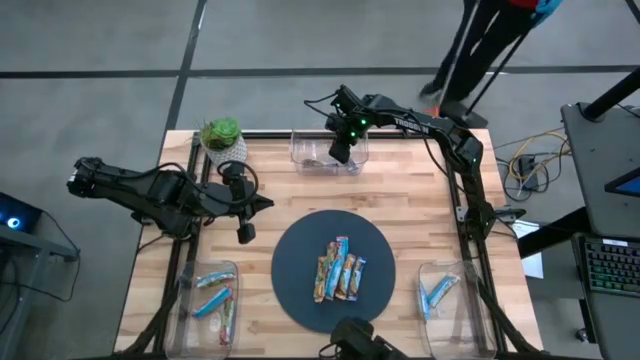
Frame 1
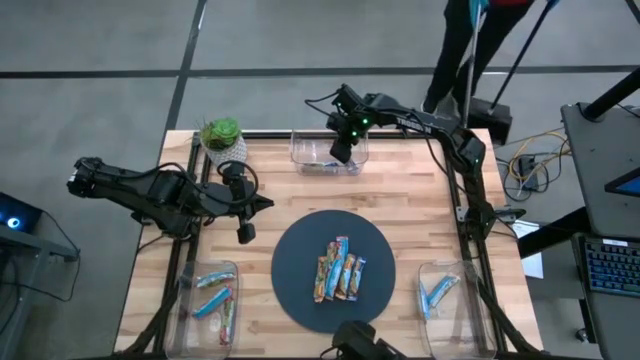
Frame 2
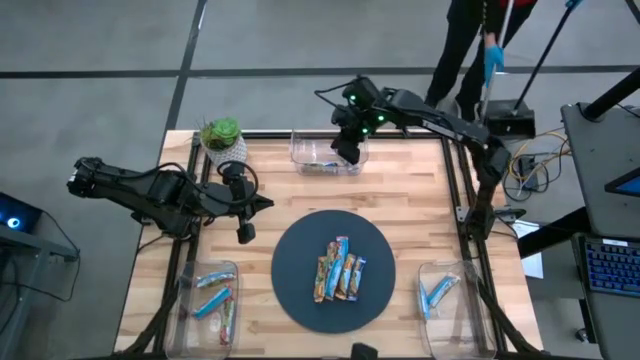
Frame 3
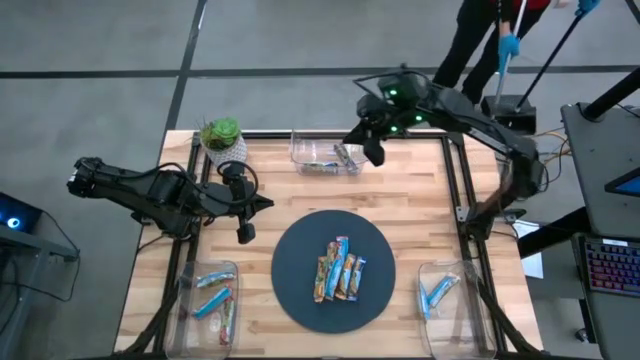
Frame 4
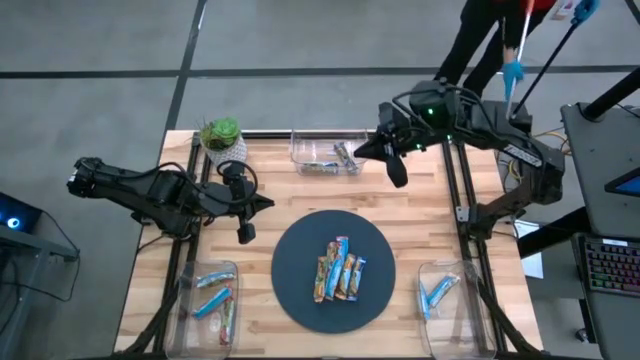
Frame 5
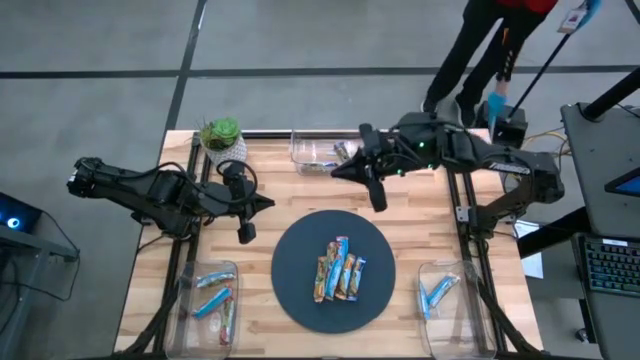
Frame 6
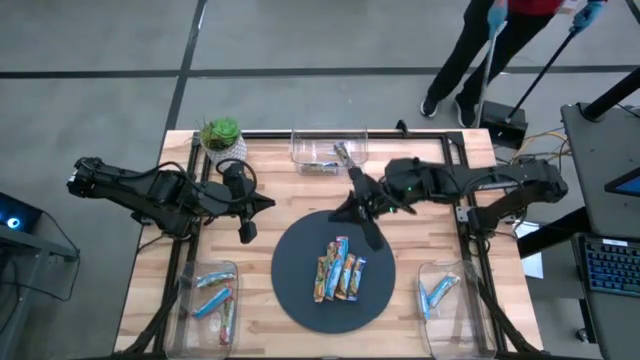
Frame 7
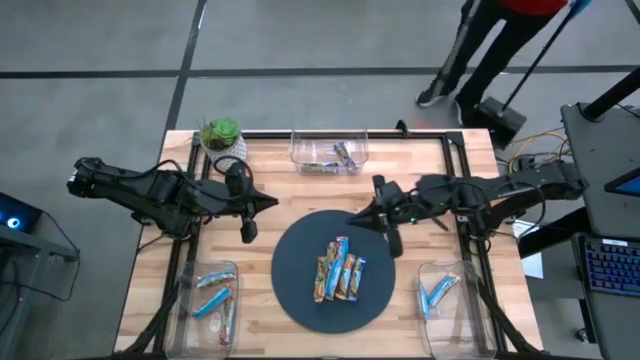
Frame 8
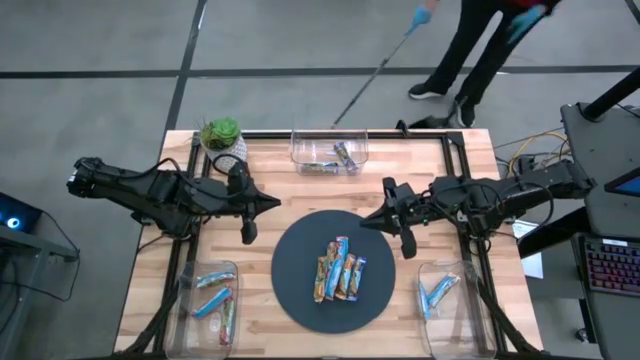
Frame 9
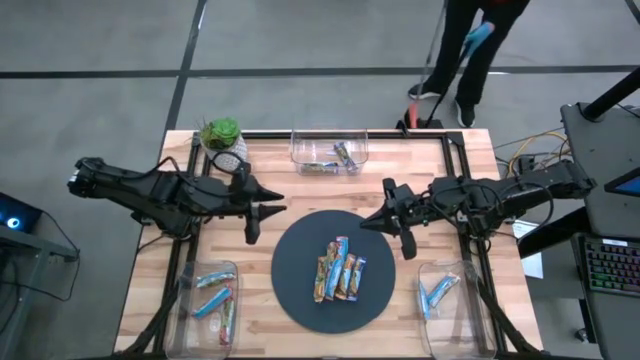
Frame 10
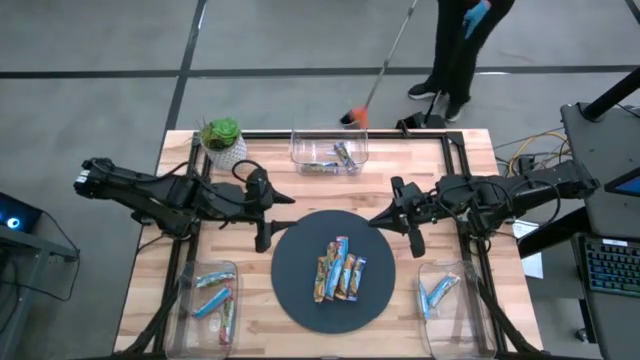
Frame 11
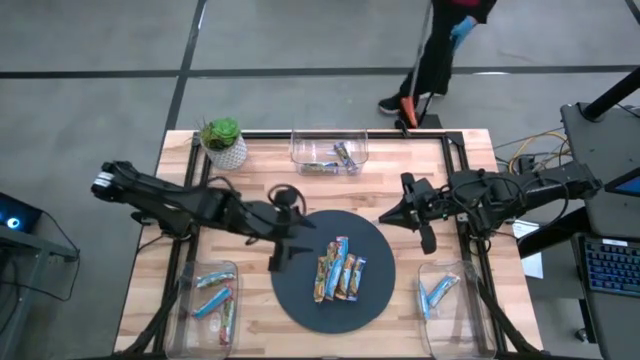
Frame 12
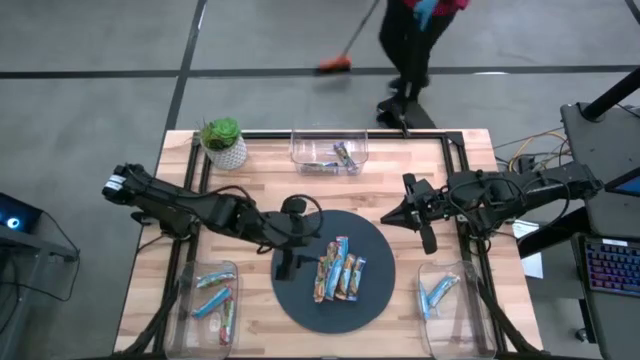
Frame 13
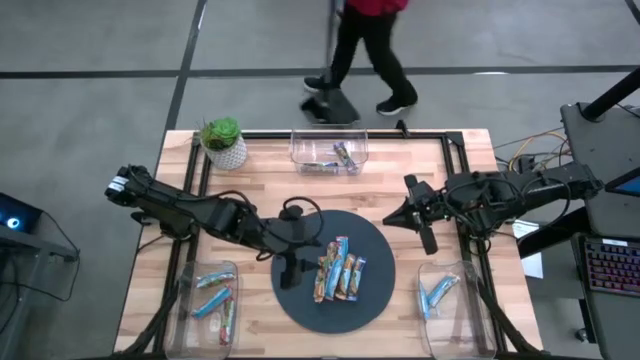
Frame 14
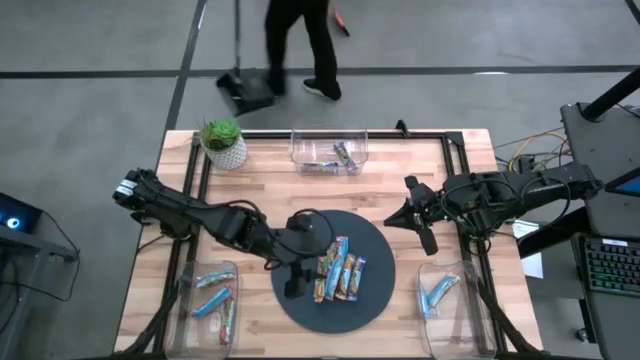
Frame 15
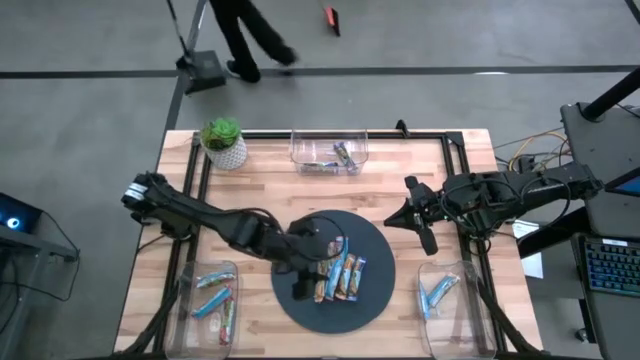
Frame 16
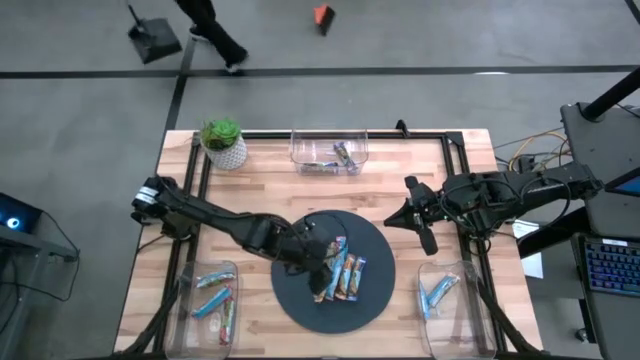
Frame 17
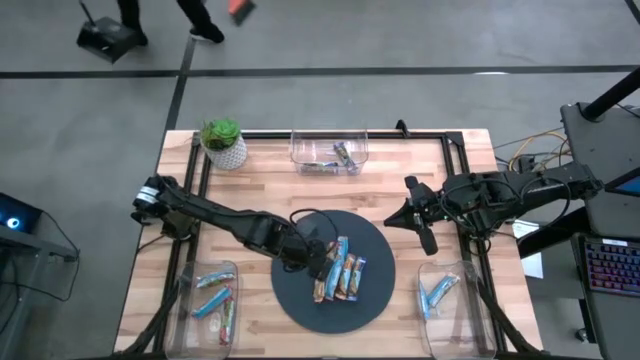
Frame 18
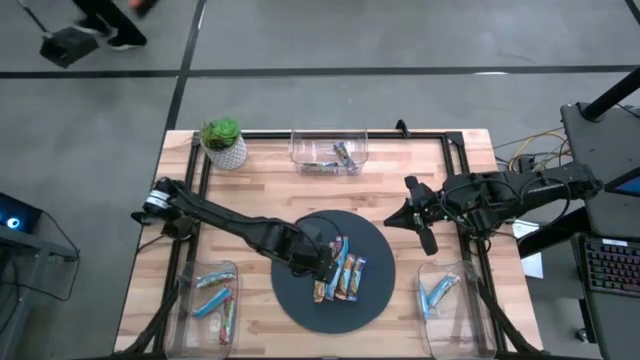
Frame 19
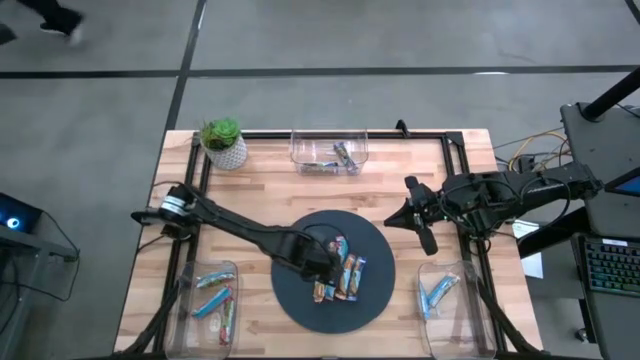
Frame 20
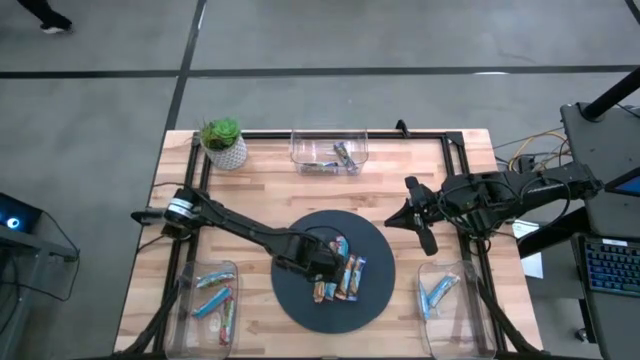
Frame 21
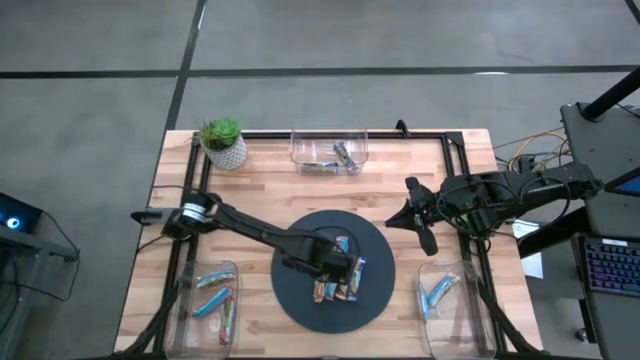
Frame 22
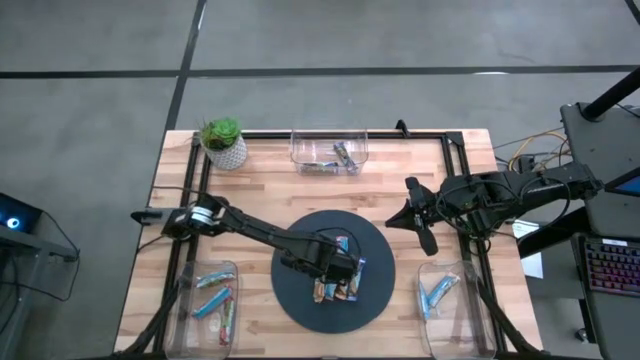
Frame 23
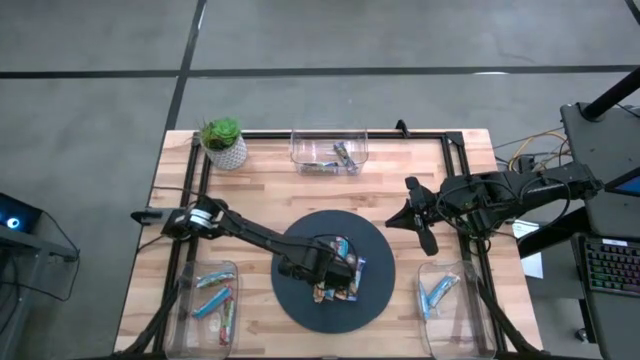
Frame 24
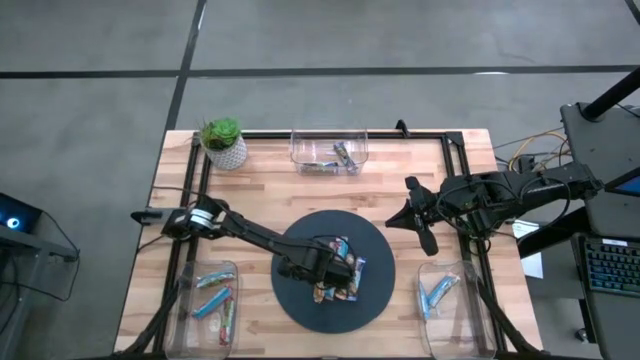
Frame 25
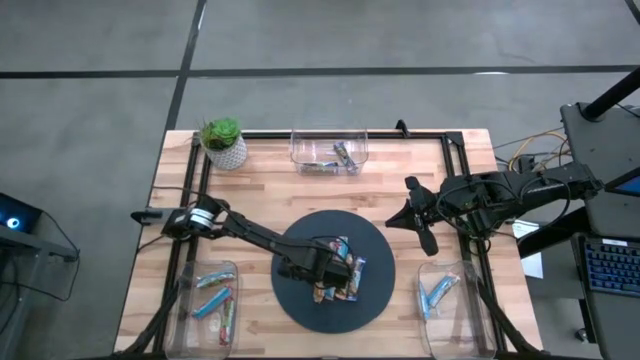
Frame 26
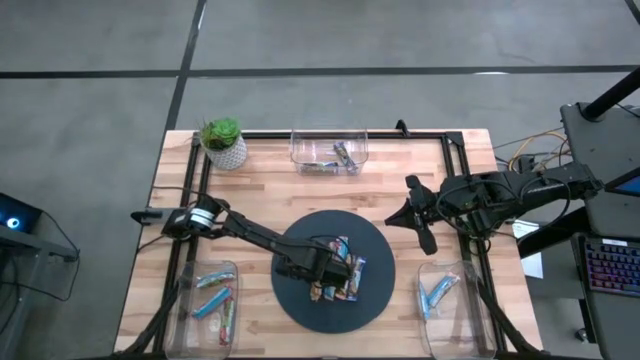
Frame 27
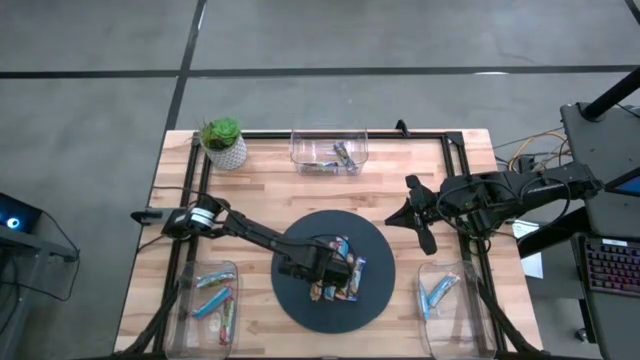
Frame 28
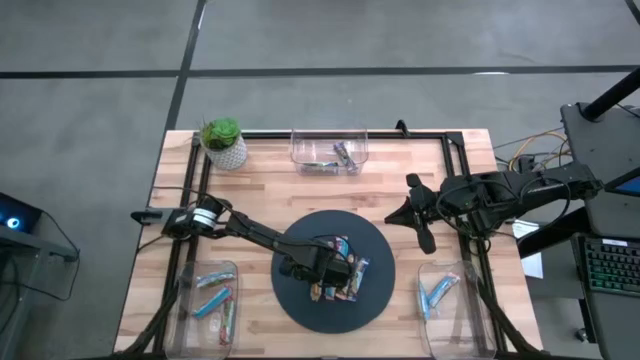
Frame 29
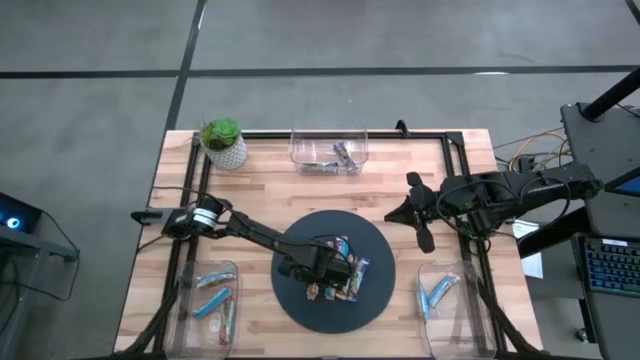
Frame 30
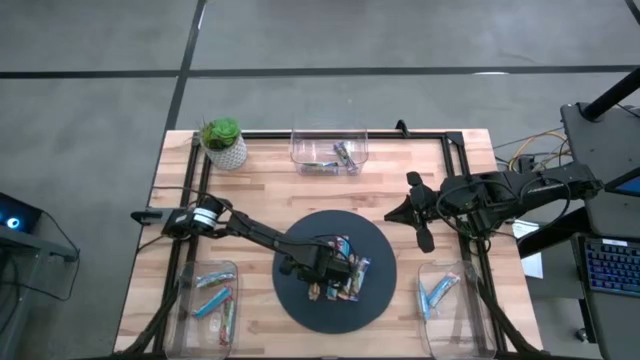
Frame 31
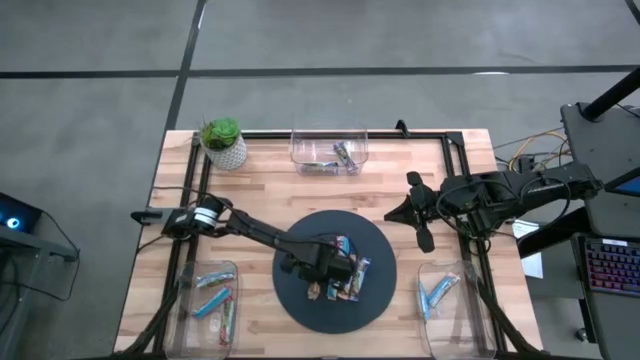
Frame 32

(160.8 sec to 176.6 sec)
Task: Pick and place Granola Bars by type
Put the yellow granola bar into the bottom right transparent bin

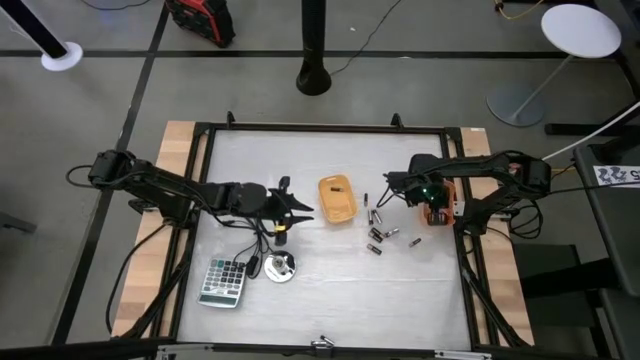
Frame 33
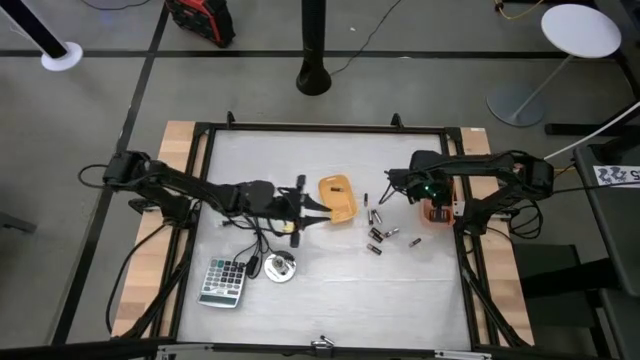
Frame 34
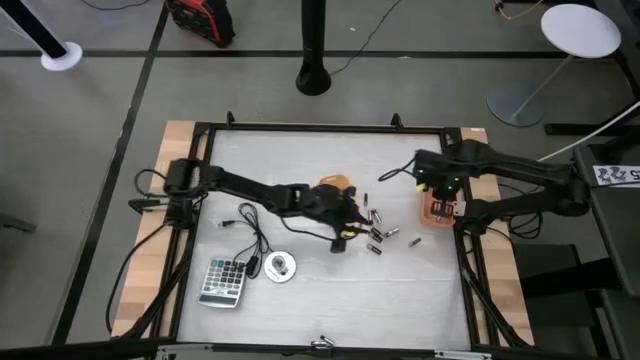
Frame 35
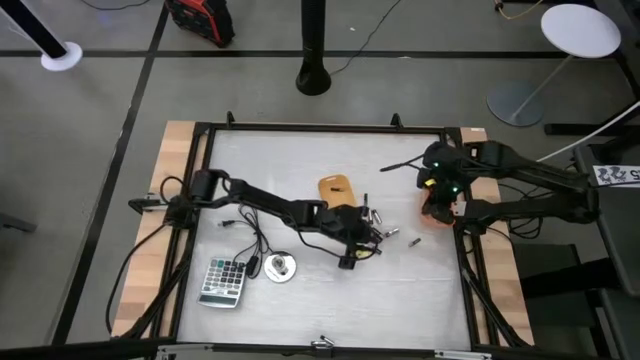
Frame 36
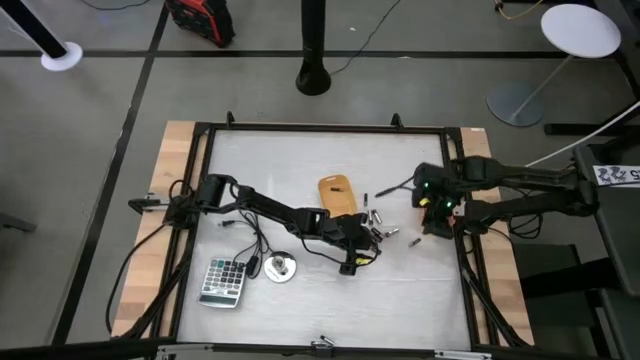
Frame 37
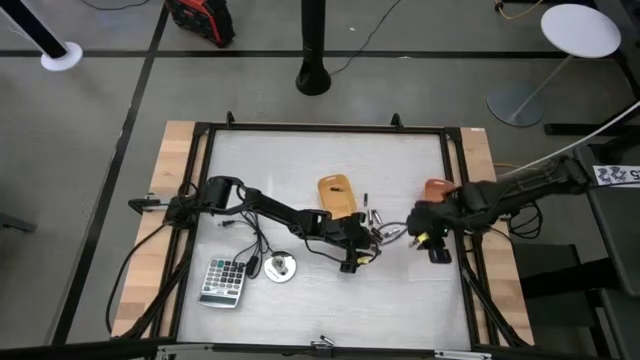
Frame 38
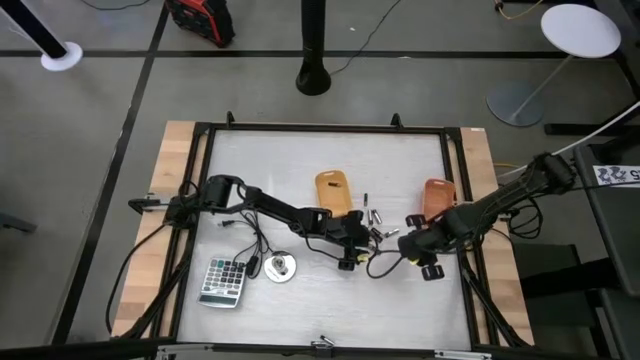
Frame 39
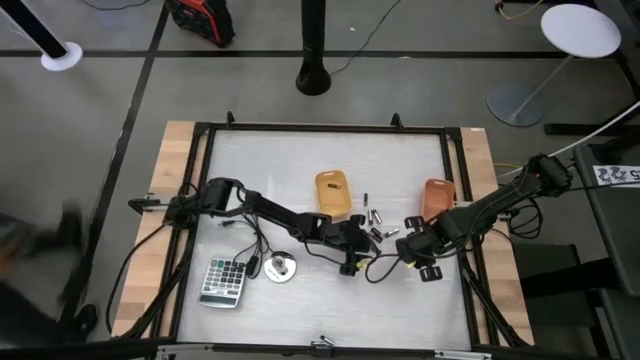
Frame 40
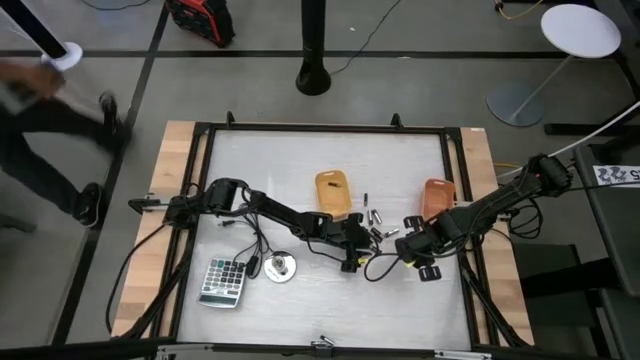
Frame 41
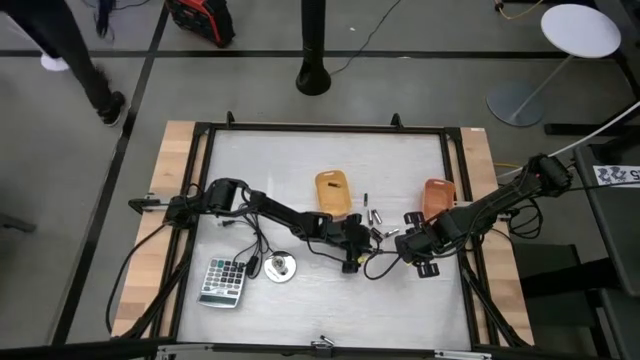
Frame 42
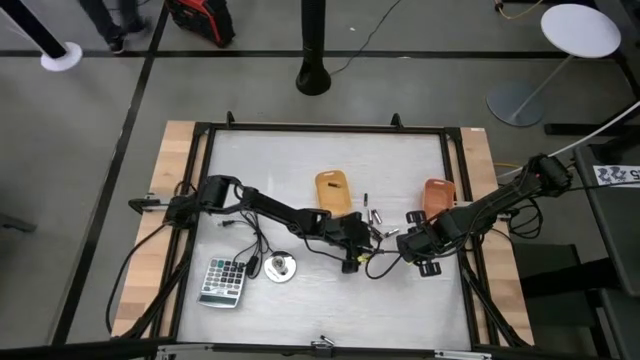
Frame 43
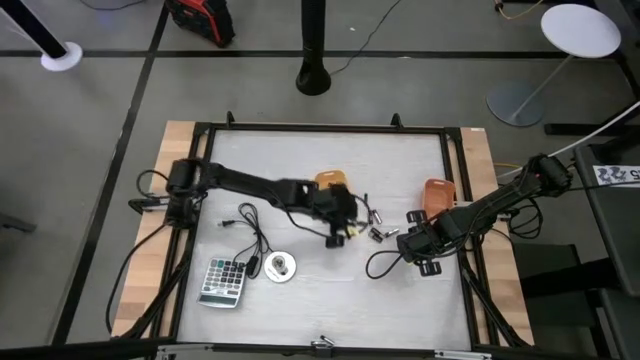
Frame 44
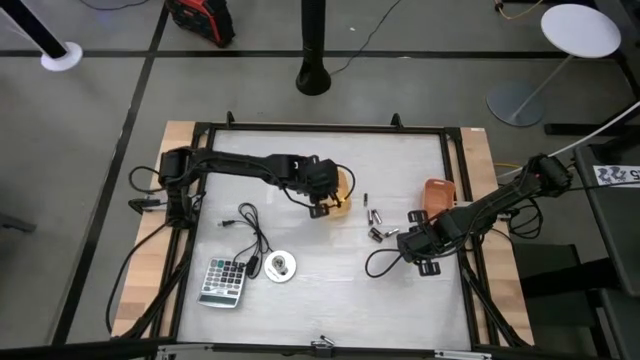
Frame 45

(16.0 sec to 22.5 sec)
Task: Sort batteries
Put the black battery into the yellow bin
